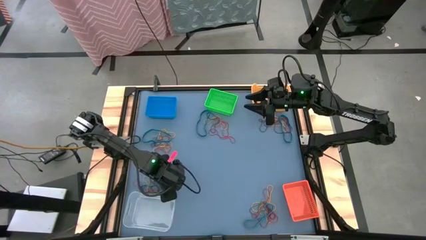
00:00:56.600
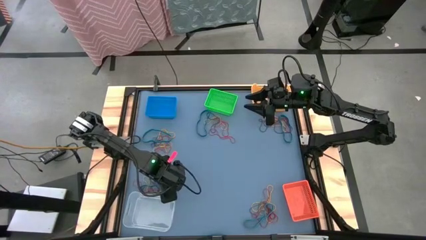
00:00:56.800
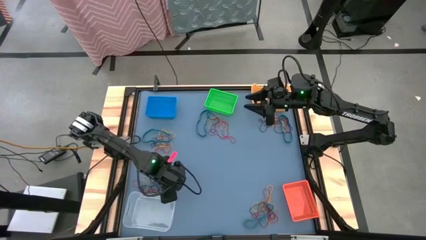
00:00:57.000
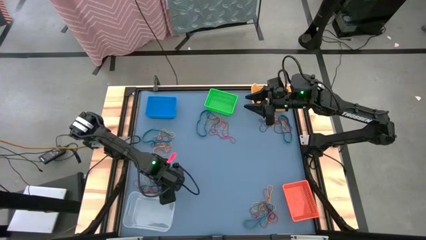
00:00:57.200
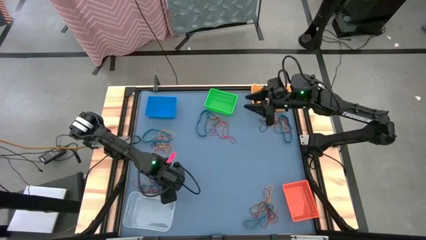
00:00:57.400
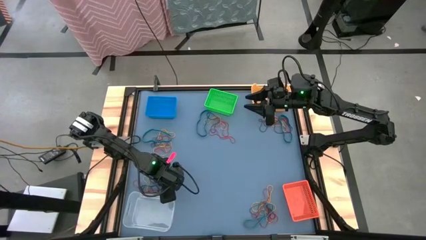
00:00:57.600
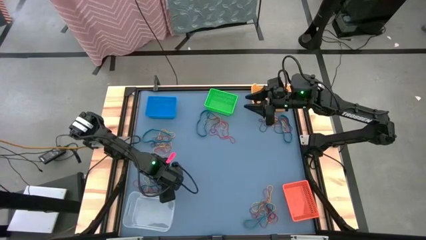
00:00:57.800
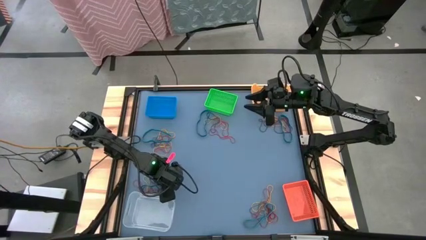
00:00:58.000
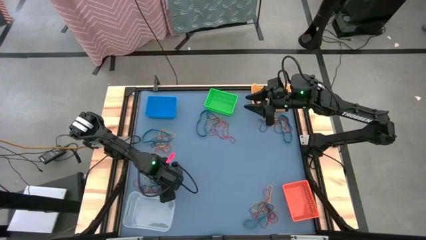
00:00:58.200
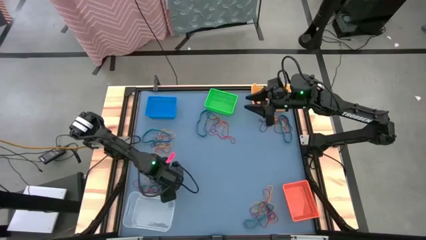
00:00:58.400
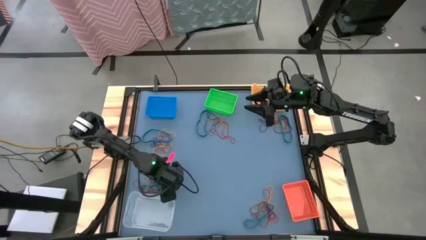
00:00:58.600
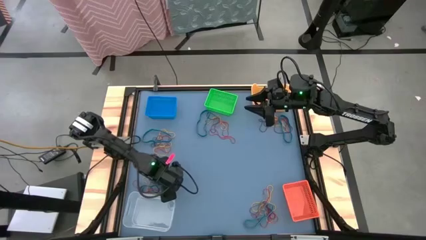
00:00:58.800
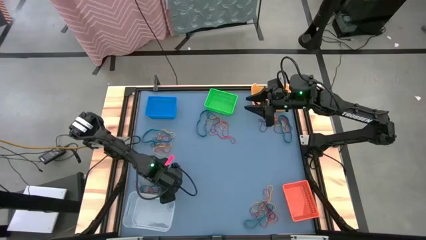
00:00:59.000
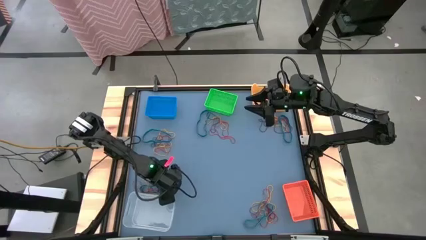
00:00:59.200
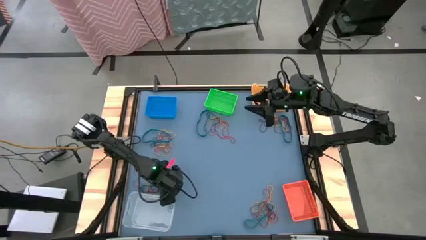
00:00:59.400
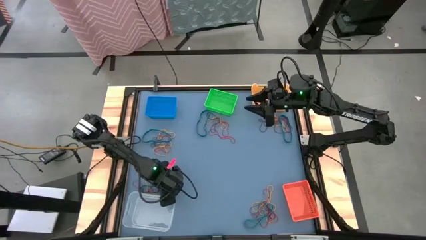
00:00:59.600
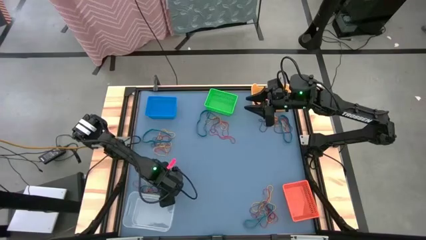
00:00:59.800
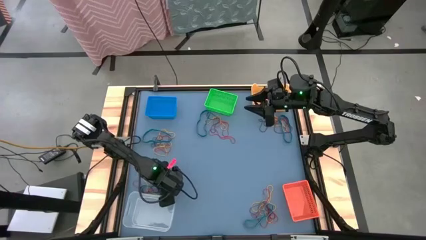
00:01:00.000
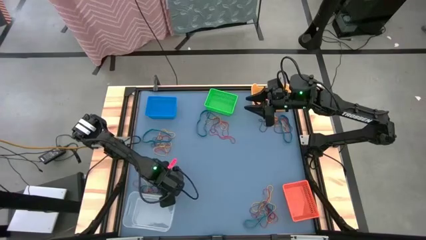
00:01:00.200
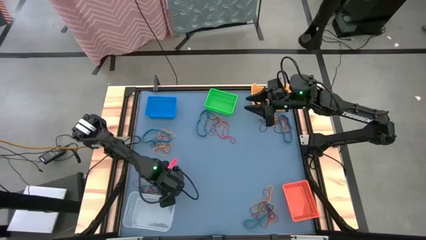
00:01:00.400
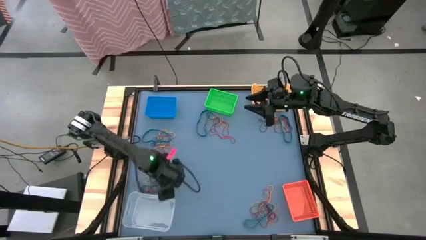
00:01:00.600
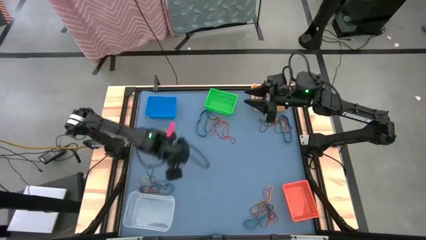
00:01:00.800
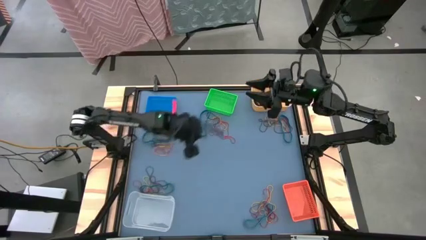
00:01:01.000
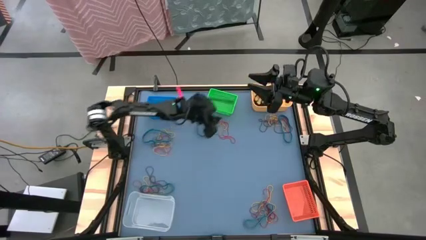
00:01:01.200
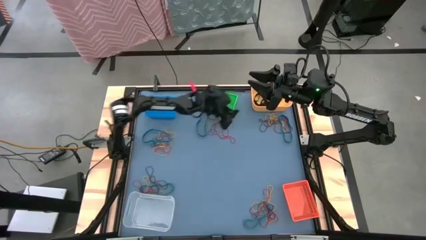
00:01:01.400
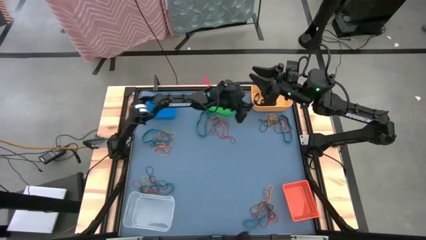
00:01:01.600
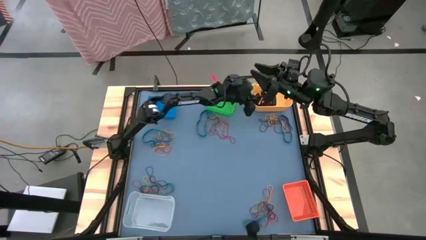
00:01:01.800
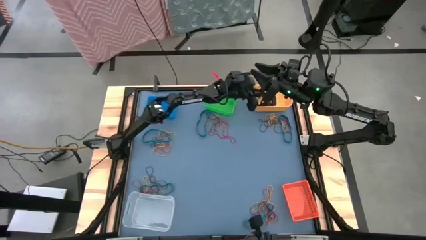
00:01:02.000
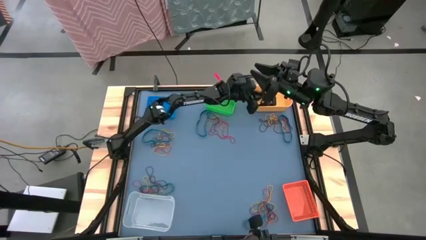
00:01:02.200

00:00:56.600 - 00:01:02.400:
Task: Sort rubber bands into baskets
Put the black rubber band into the yellow bin

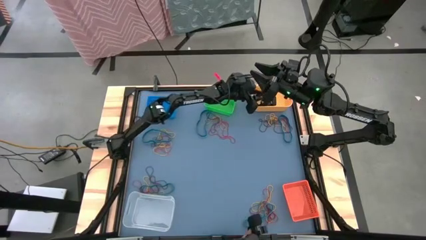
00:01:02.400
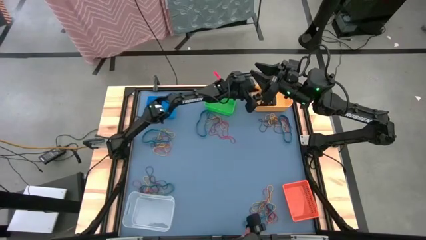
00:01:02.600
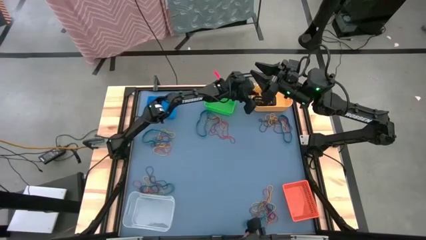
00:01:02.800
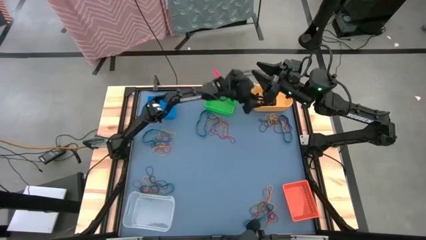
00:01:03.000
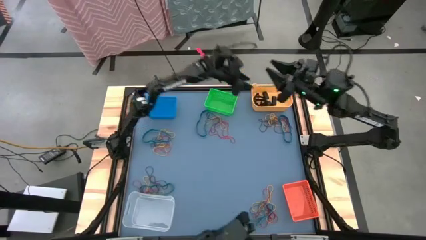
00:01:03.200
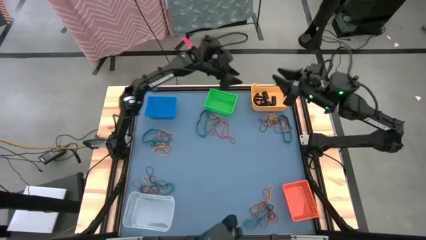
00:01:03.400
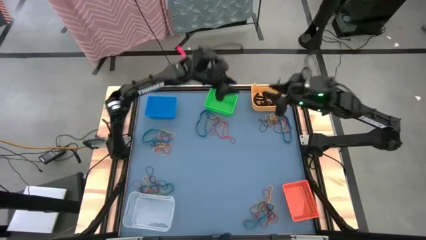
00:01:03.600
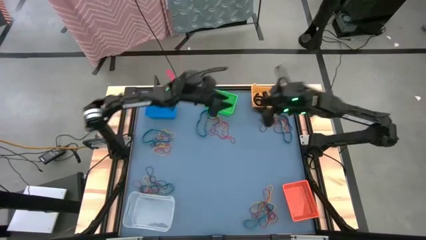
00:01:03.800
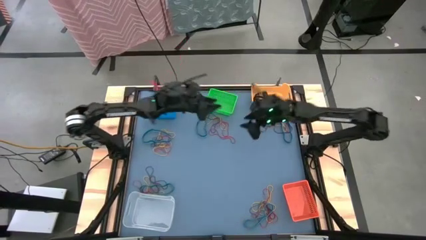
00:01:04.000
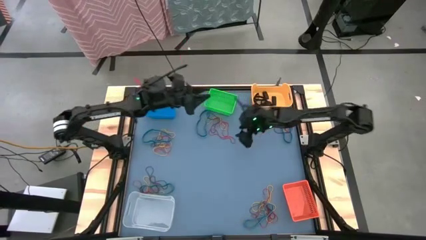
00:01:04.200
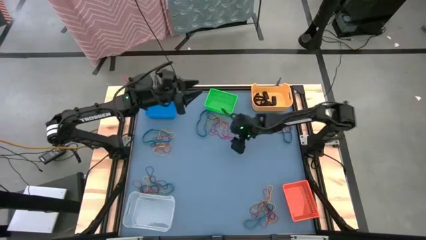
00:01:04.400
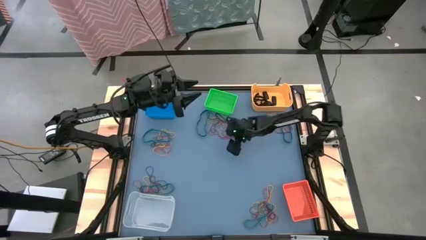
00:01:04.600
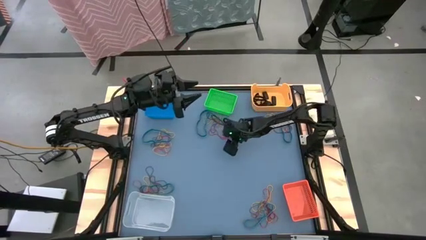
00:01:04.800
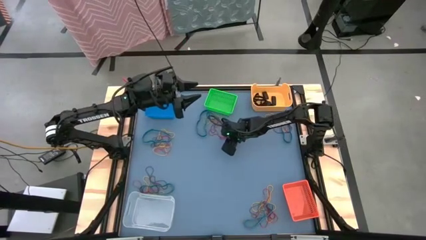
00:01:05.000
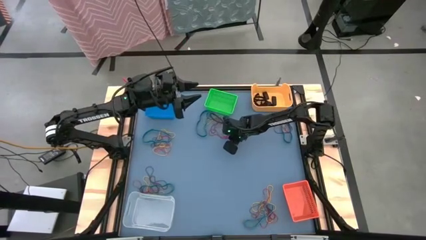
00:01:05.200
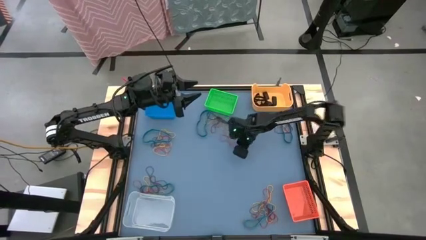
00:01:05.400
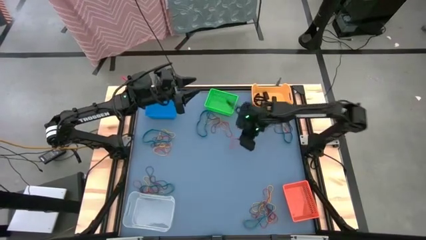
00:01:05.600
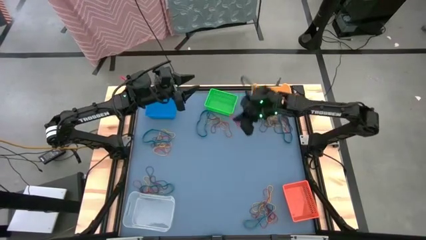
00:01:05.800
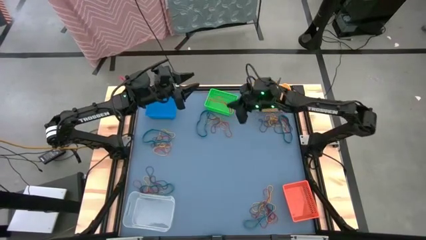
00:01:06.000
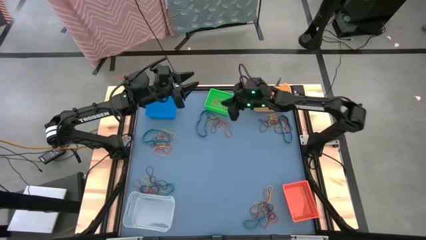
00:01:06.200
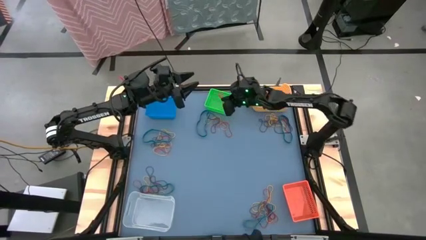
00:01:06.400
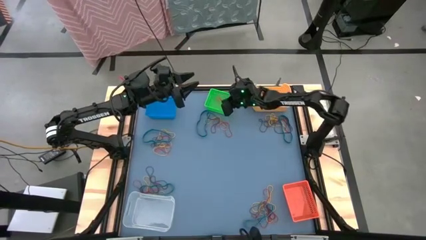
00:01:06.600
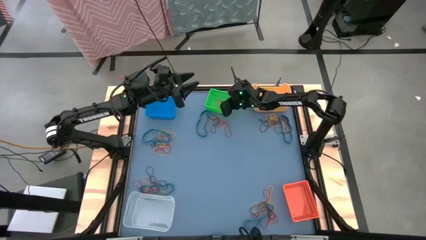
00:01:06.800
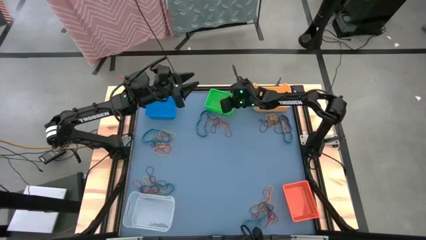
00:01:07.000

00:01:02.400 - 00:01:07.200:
Put the red rubber band into the green bin

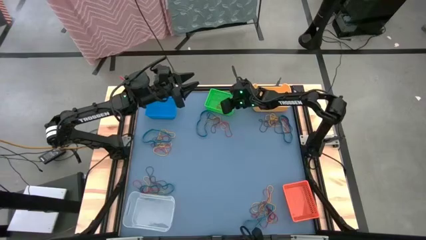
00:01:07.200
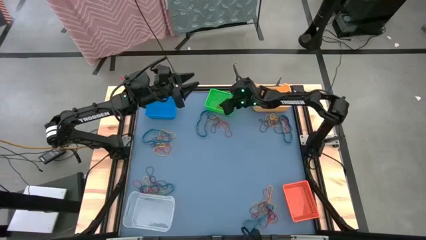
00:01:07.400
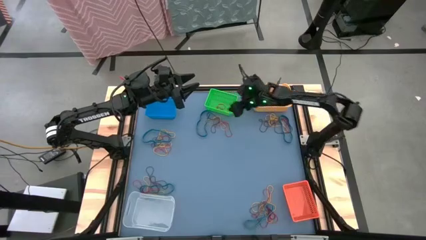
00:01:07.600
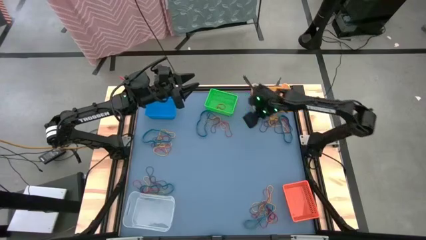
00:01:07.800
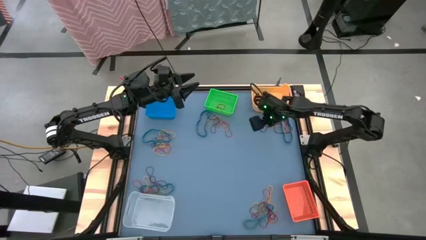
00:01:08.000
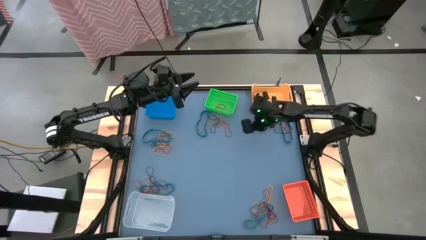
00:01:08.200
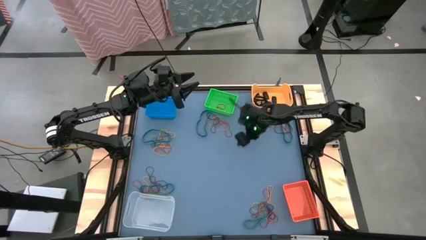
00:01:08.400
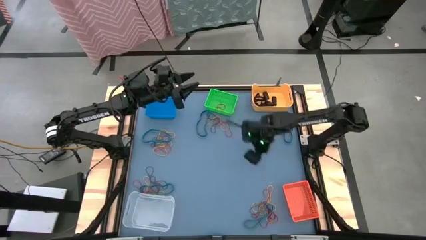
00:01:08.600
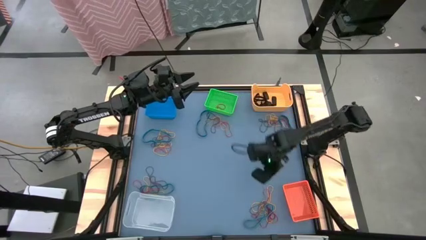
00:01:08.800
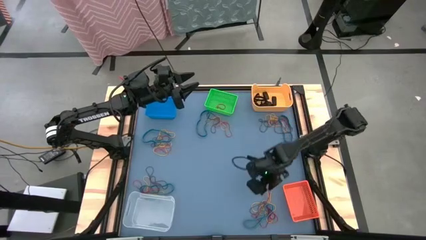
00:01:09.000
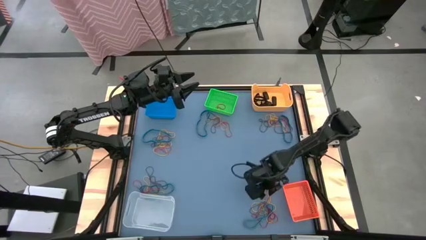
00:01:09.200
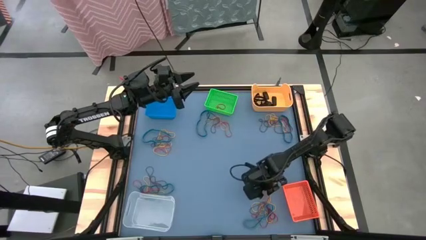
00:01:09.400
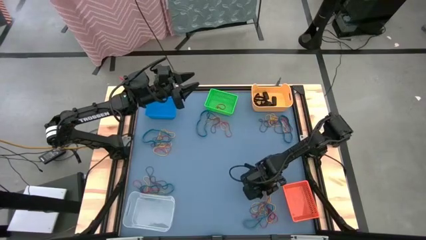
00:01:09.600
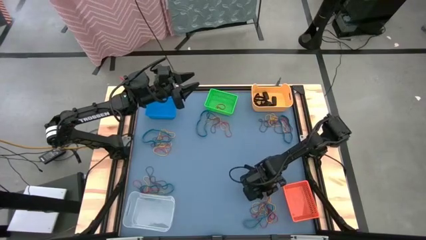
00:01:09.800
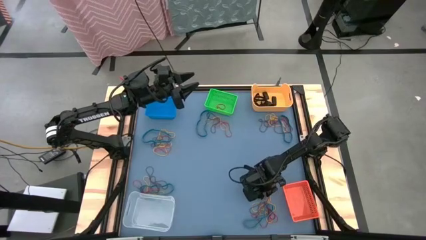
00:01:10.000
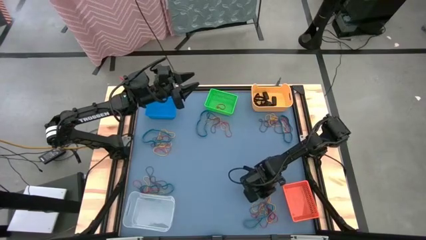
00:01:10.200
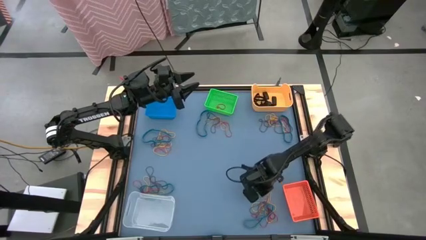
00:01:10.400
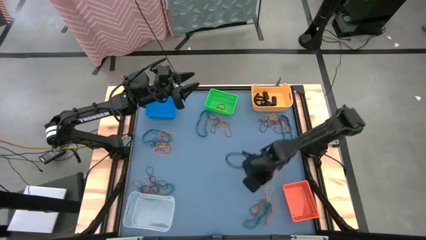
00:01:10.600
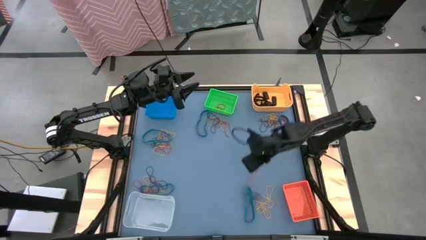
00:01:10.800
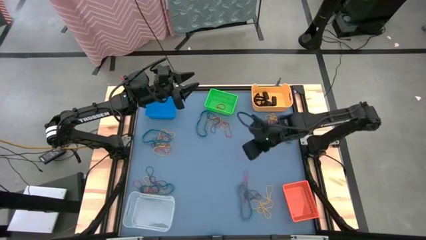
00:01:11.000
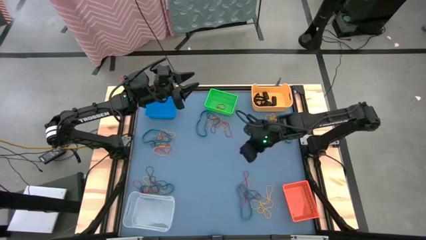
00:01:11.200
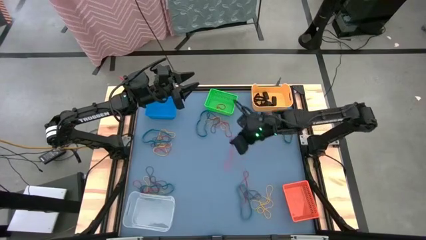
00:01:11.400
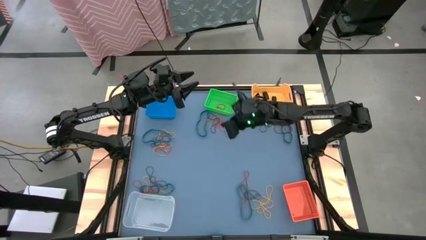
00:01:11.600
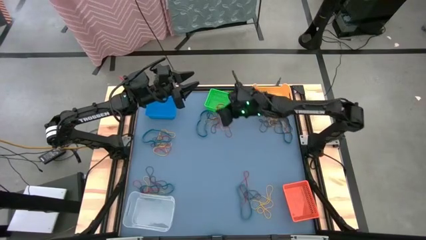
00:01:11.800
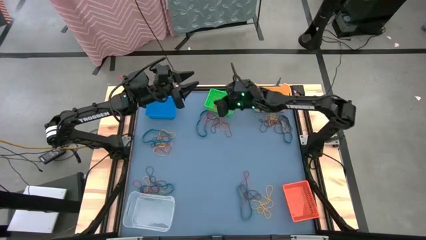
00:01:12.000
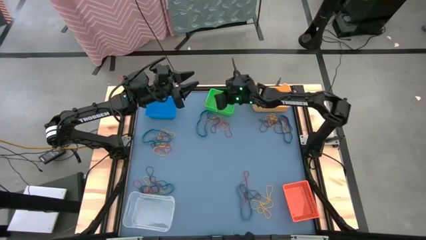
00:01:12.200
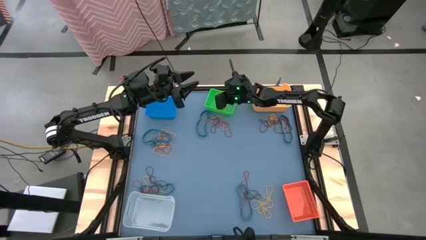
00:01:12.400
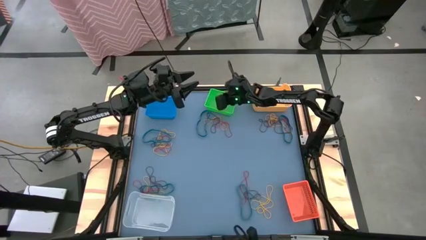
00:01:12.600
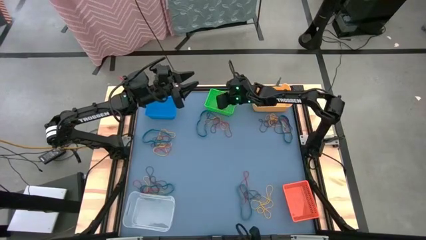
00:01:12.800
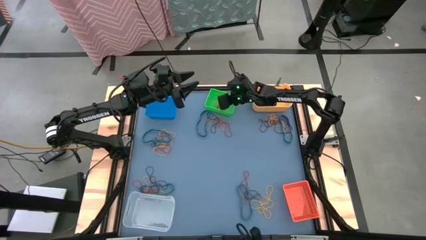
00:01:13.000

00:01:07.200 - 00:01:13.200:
Put the red rubber band into the green bin
